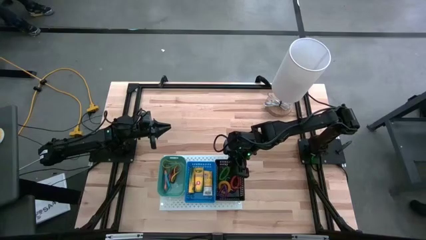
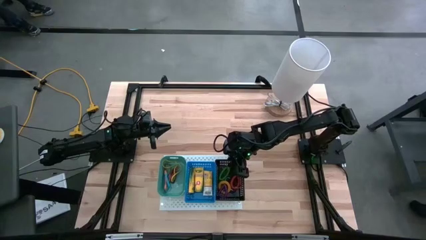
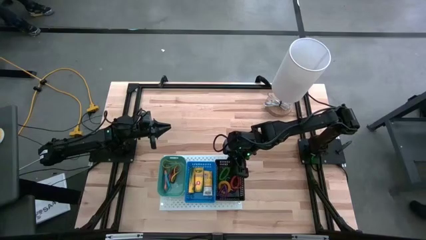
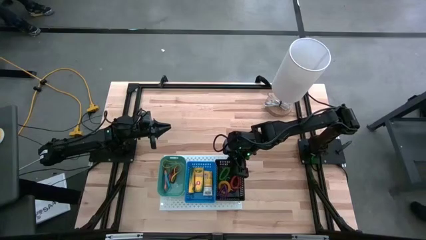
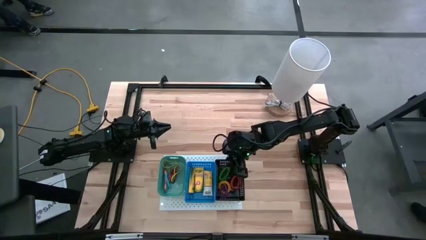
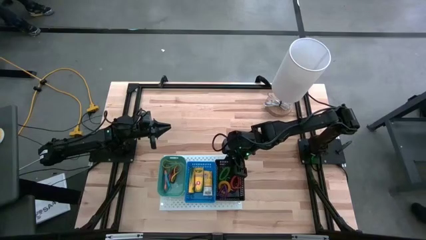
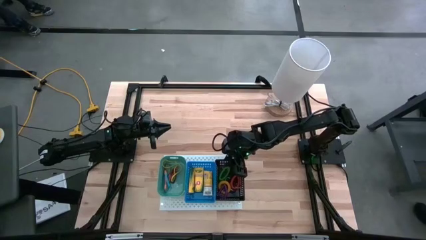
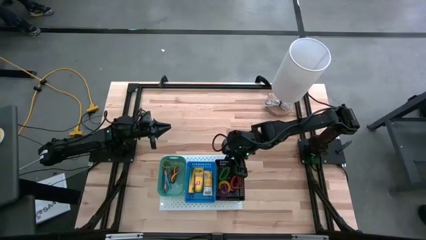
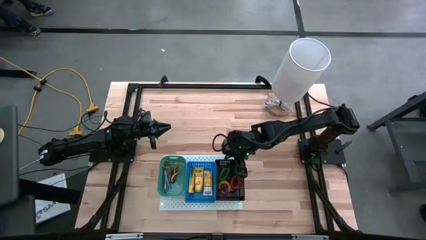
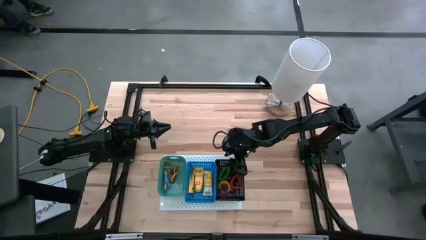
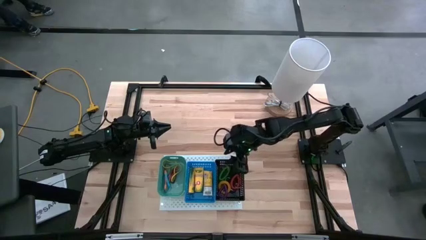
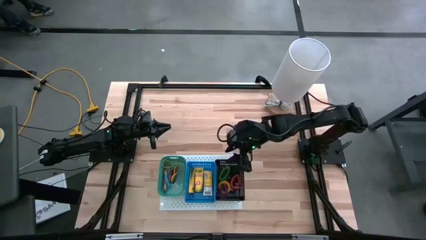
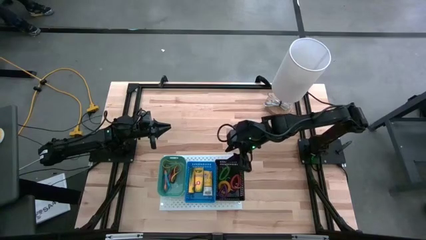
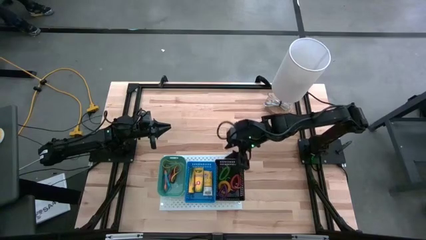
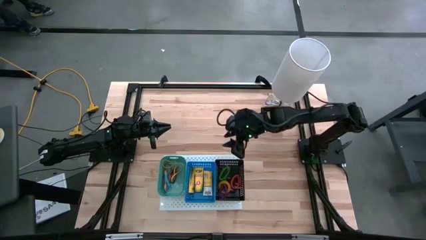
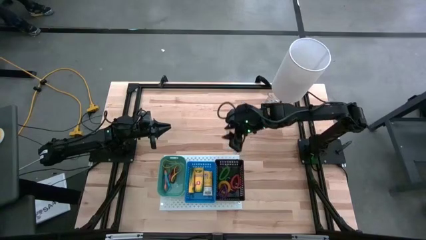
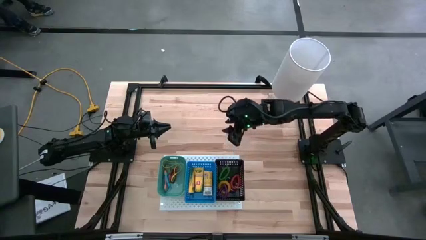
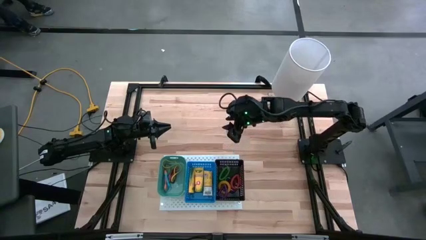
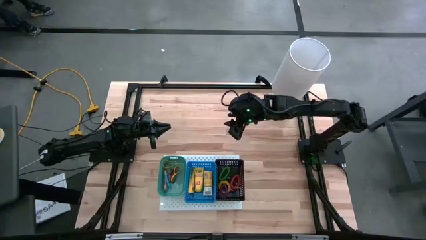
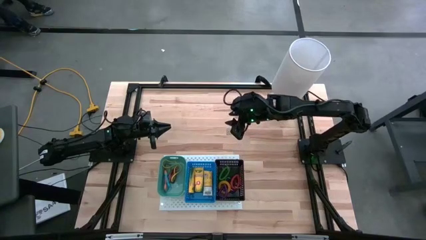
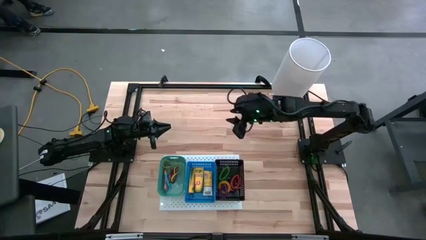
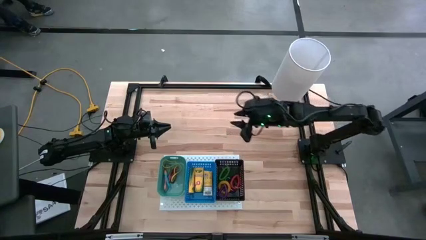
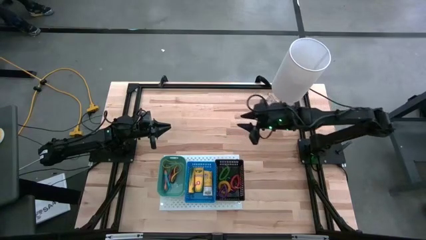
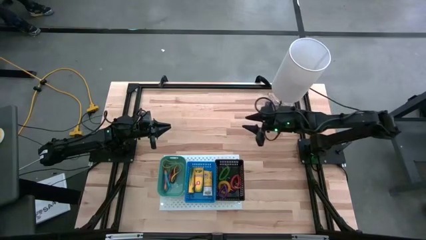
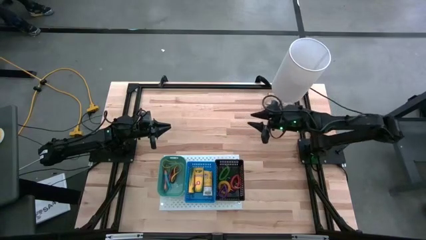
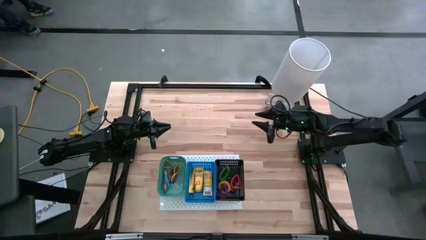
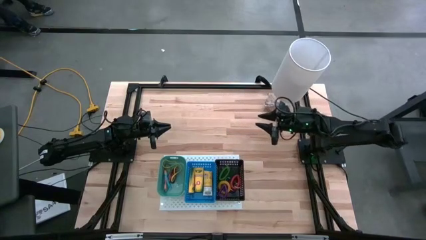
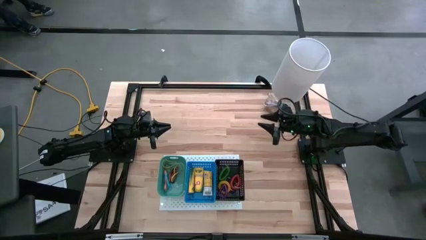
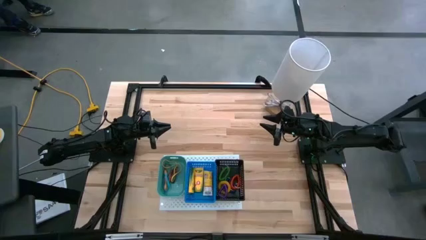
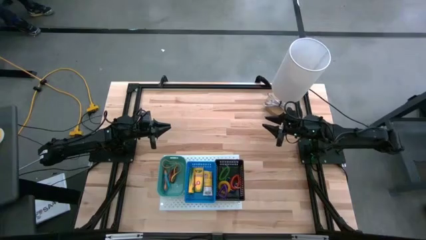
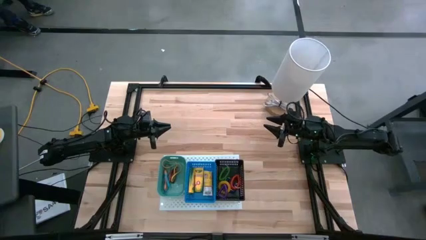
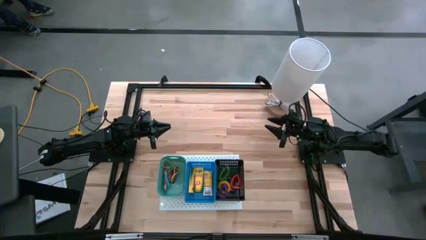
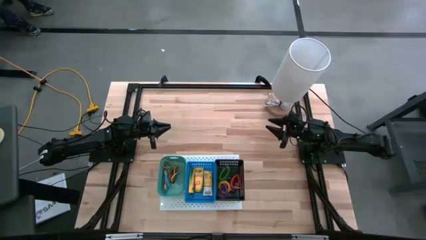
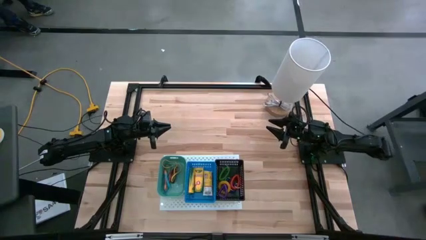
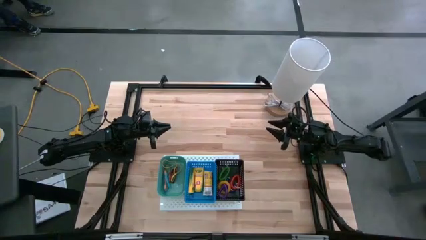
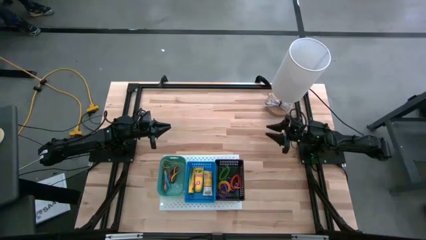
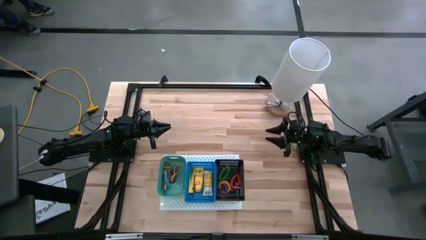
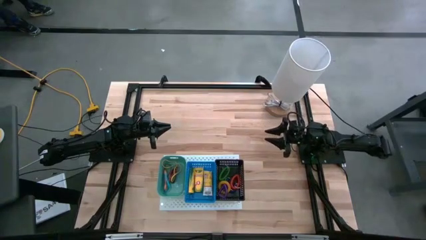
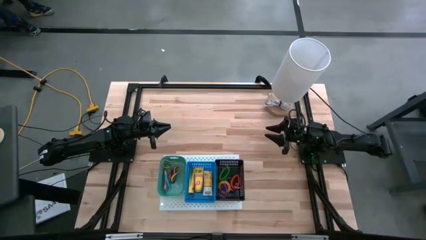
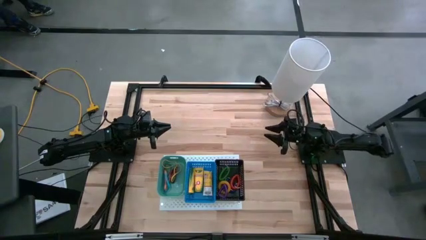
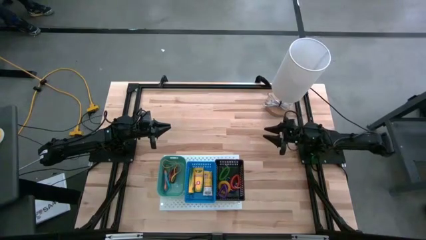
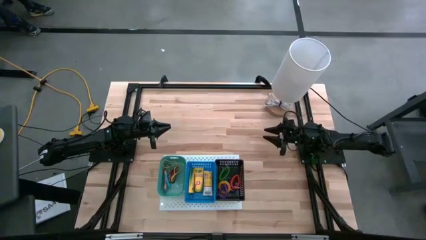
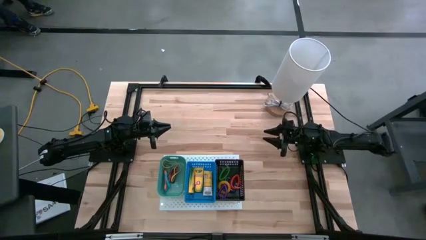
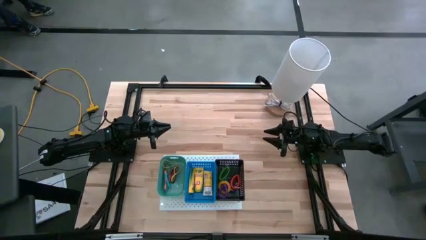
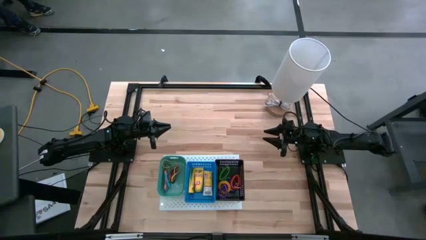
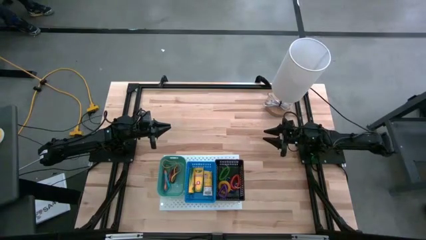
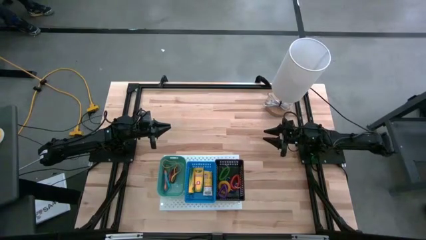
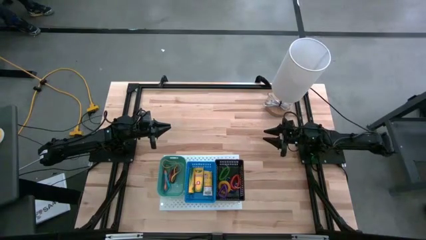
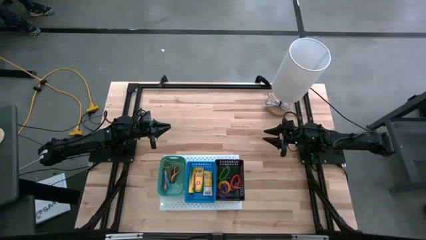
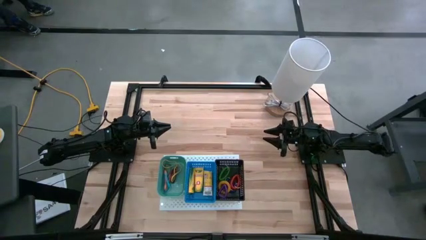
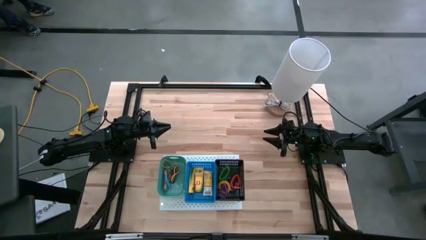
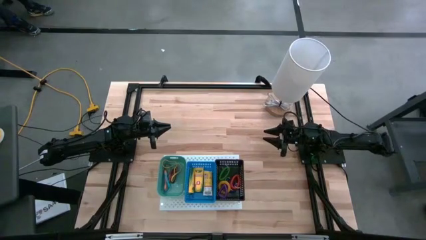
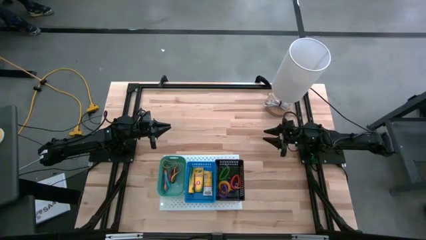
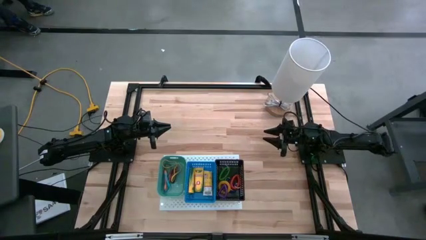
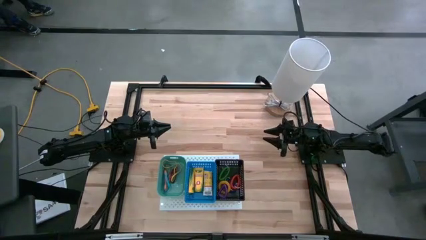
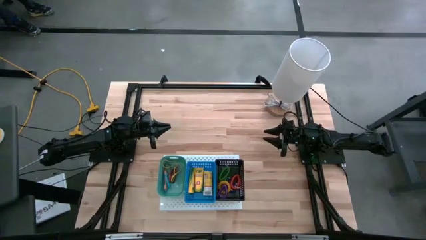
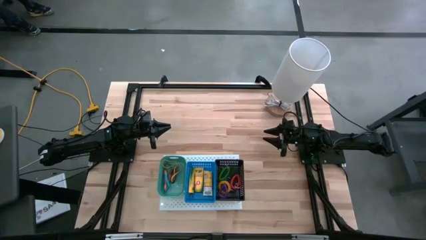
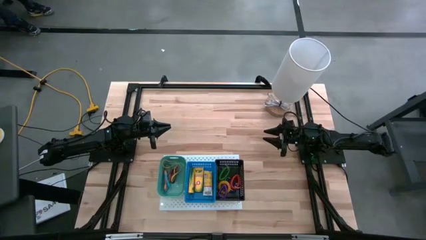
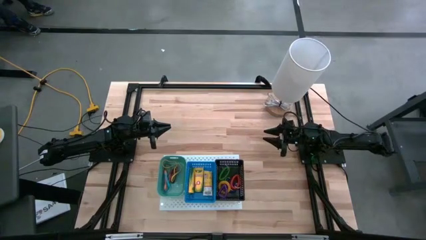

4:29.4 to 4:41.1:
Task: Pick & Place Office Desk Supplies
Return to Home Position
